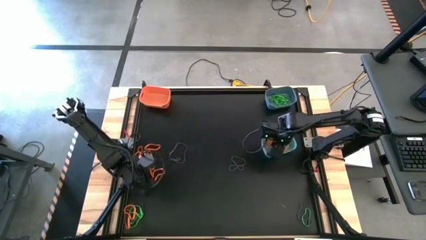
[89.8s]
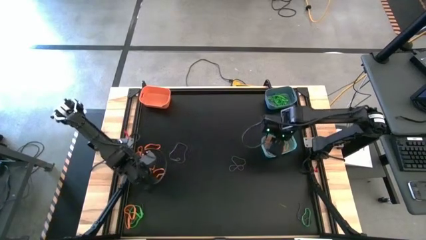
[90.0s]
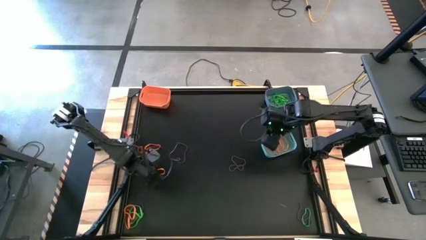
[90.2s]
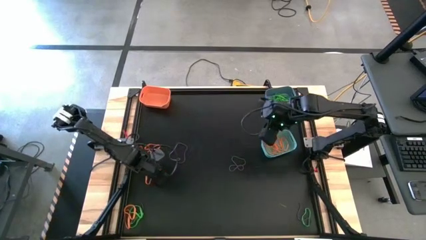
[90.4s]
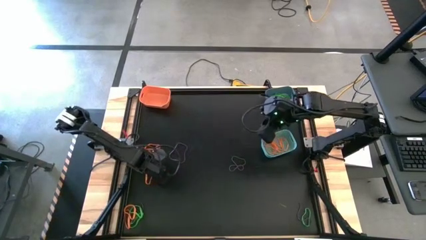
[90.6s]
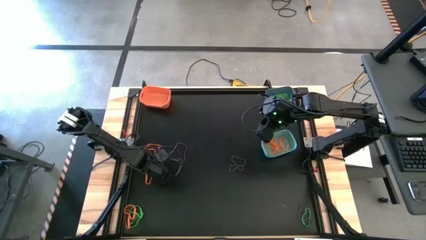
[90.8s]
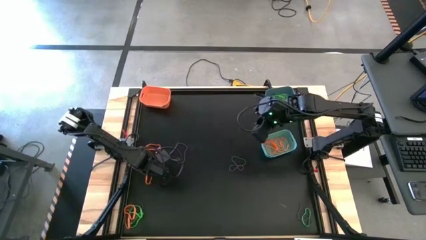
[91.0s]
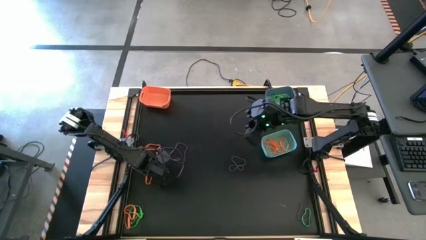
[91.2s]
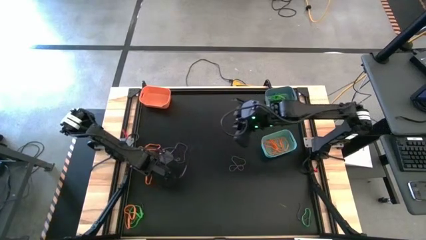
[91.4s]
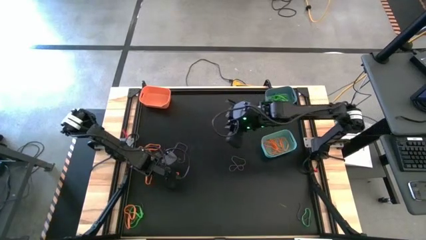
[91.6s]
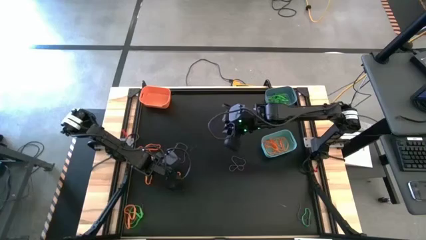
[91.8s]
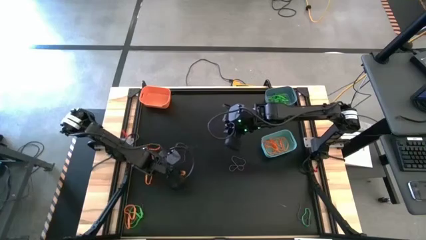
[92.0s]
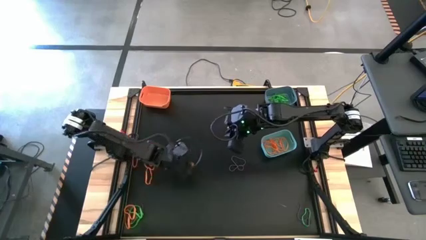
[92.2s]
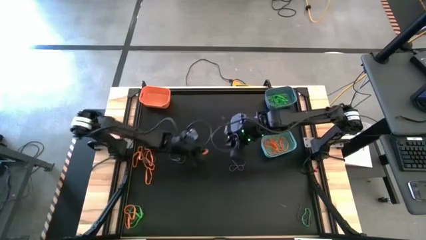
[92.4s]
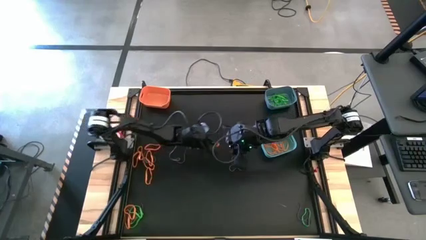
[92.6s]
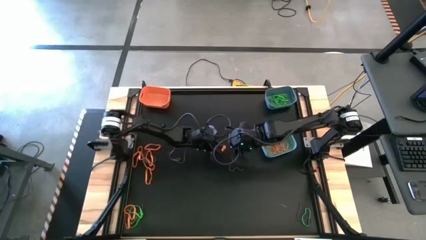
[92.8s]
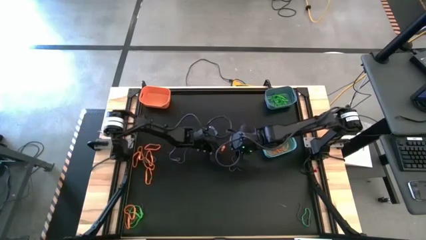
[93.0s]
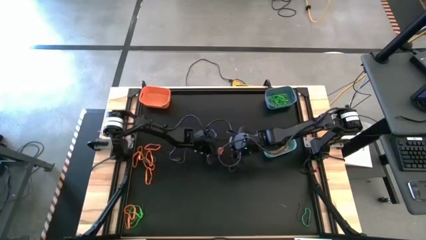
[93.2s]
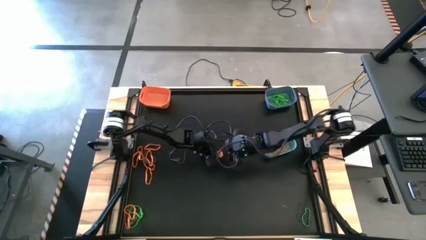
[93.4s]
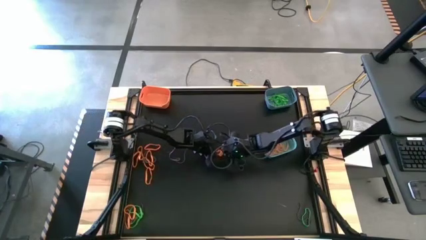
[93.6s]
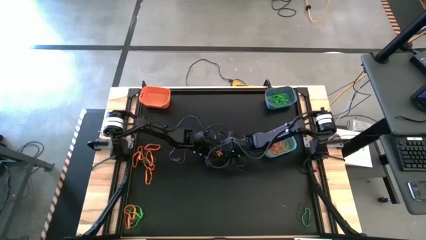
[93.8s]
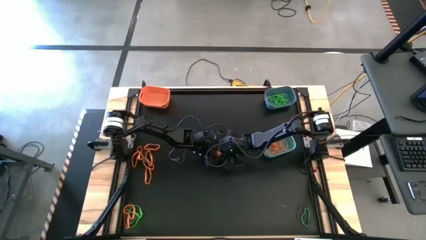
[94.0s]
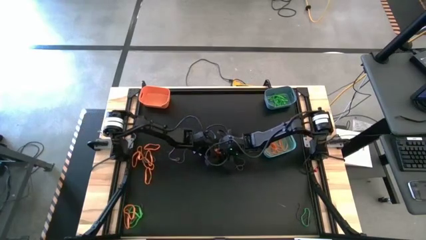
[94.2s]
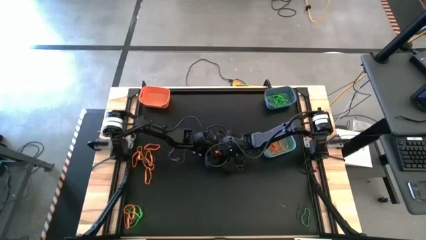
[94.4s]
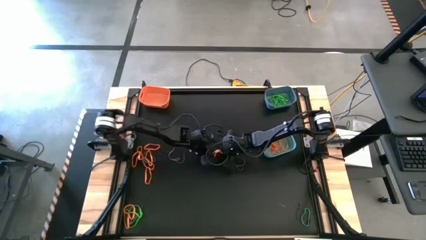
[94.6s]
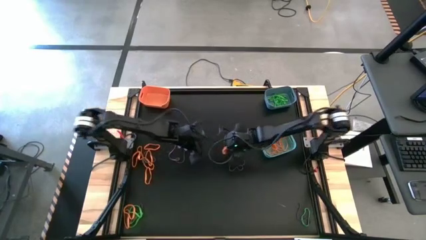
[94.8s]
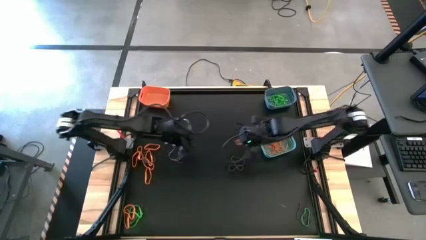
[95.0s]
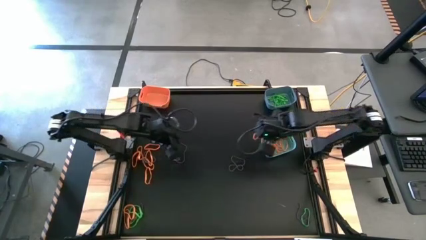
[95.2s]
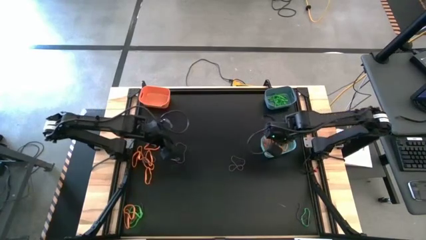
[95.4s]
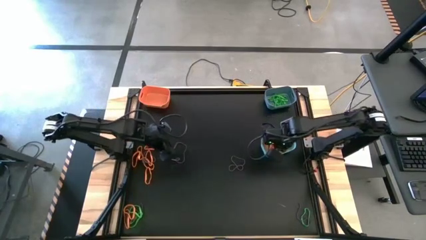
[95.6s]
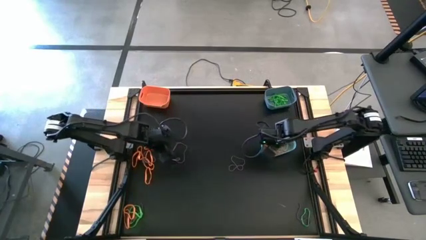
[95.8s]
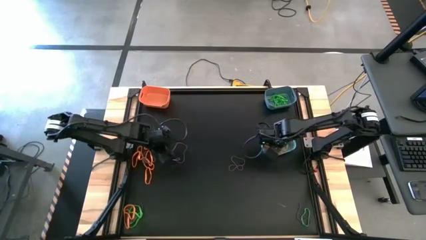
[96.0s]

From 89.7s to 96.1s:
Task: Sort rubber bands into baskets
Put the orange rubber band into the green bin

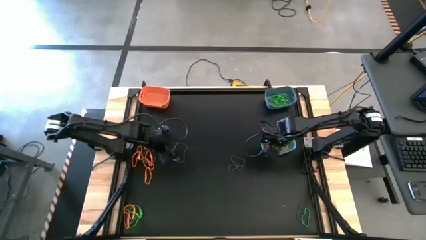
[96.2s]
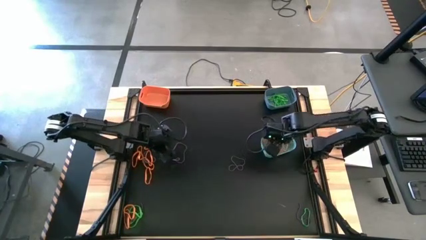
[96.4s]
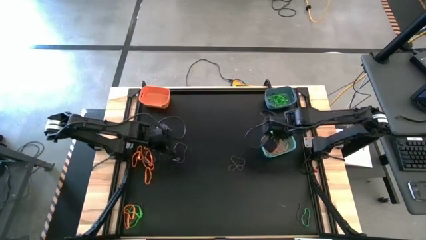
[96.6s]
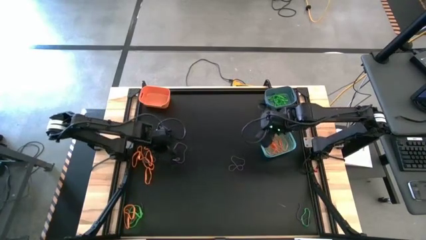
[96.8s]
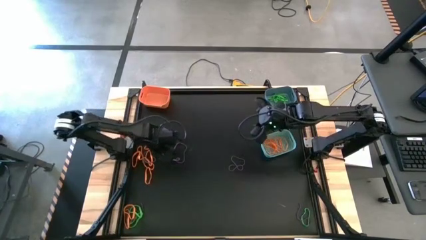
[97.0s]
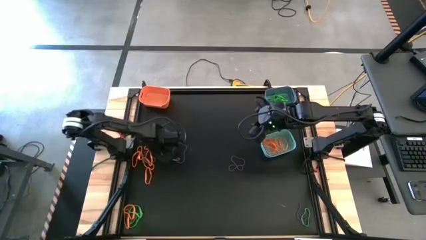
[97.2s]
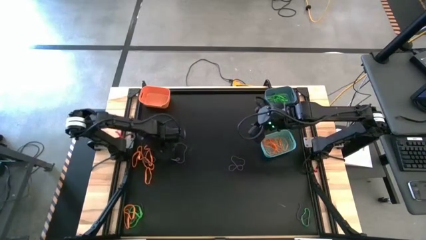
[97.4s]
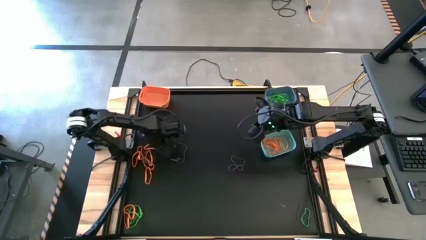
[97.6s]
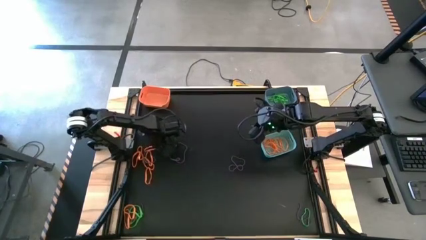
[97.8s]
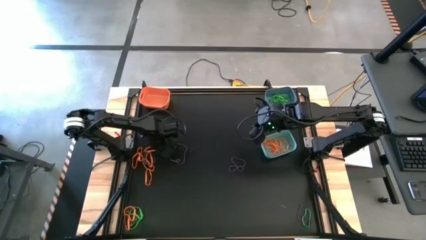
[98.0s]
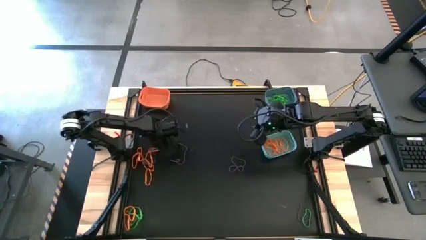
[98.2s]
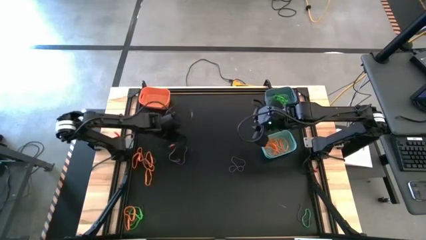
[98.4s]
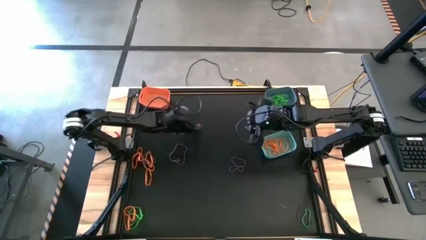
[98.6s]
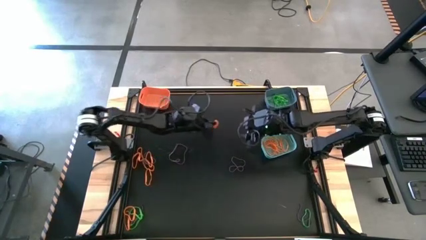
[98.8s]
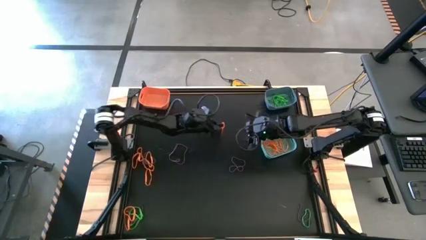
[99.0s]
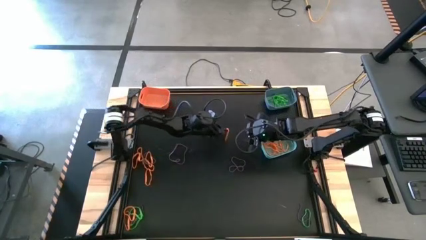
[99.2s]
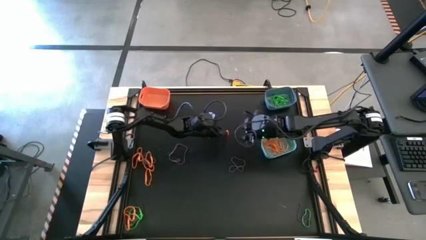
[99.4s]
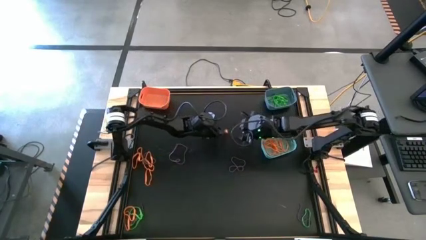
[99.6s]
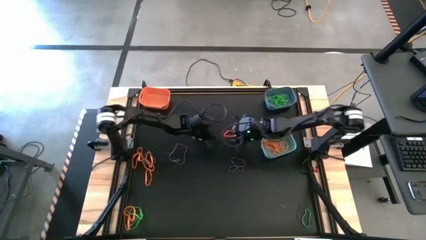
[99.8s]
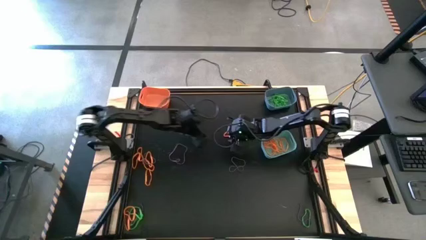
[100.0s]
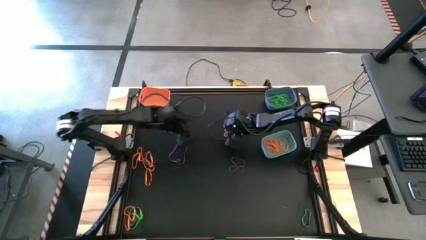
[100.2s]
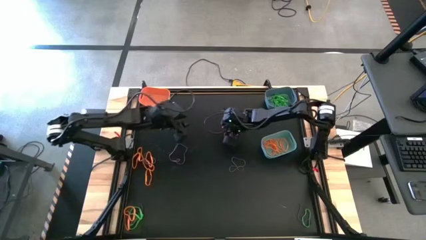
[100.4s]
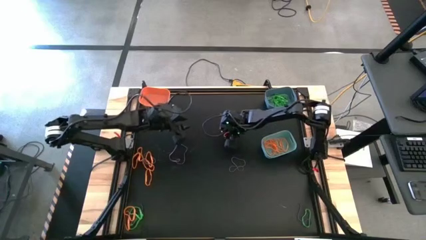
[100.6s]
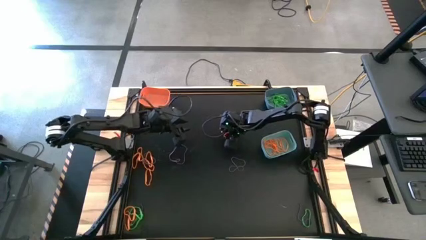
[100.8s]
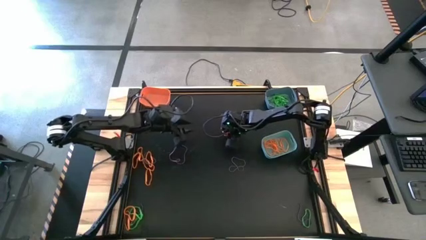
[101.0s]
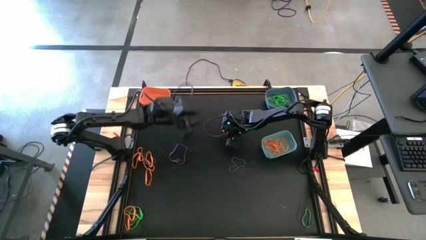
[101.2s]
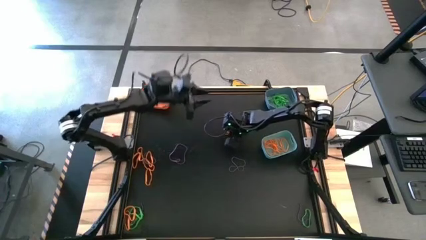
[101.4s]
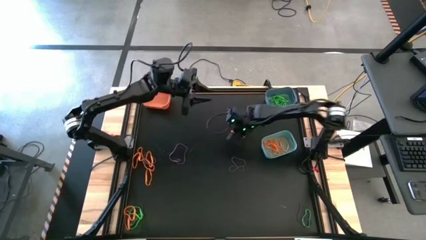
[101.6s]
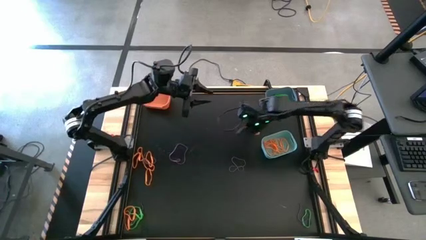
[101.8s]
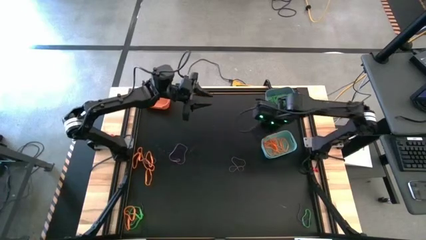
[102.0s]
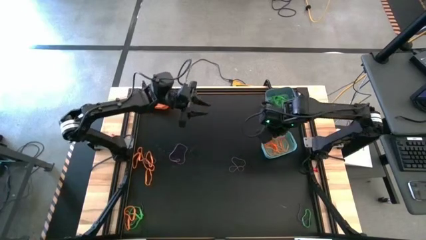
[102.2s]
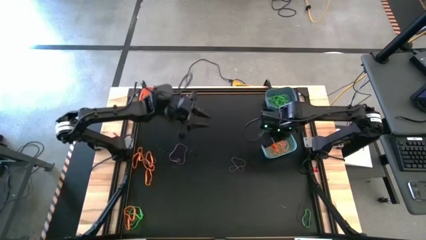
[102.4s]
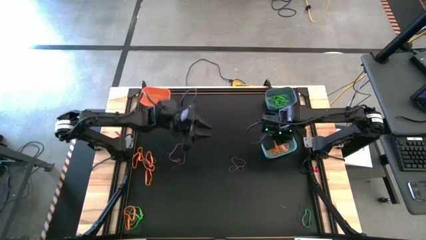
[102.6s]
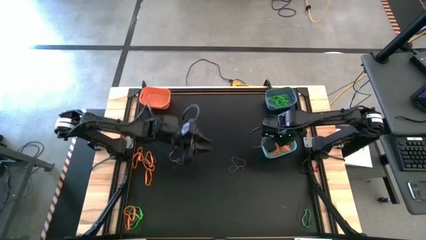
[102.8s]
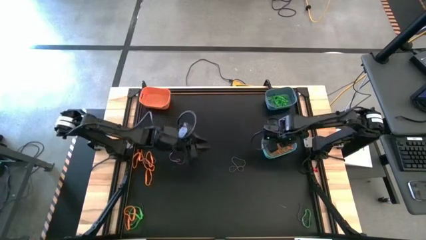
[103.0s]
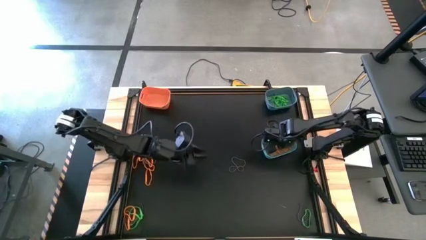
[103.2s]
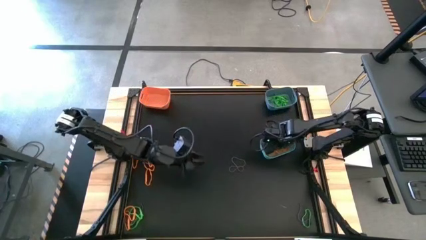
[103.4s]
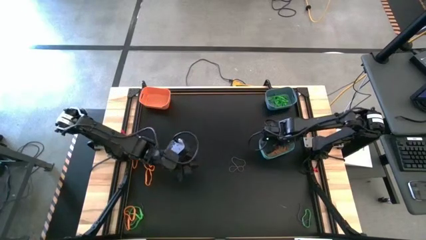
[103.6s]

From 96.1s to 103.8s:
Put the orange rubber band into the green bin

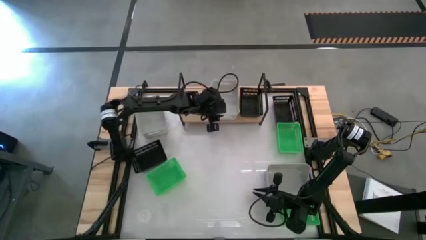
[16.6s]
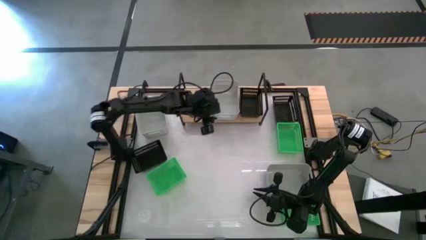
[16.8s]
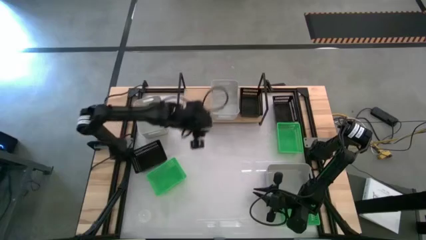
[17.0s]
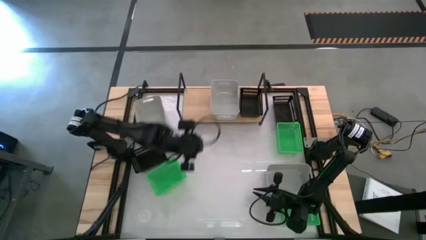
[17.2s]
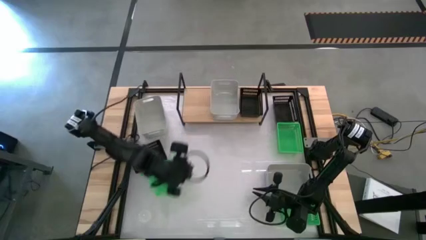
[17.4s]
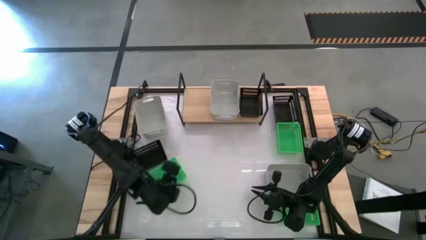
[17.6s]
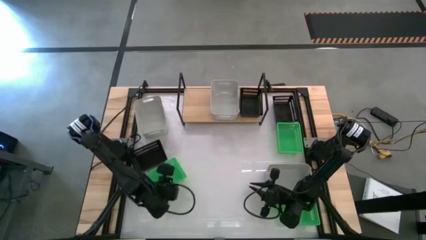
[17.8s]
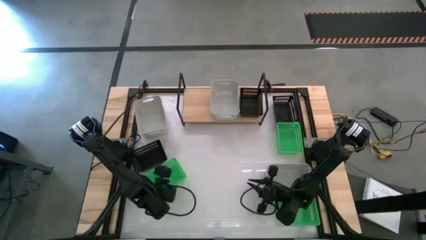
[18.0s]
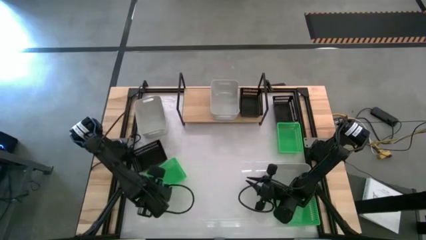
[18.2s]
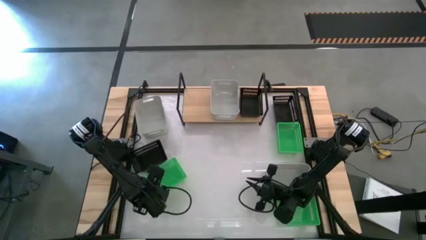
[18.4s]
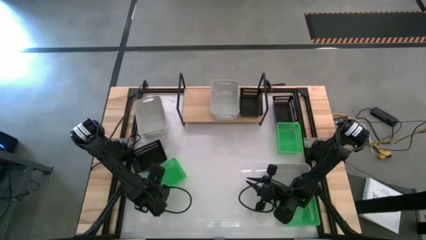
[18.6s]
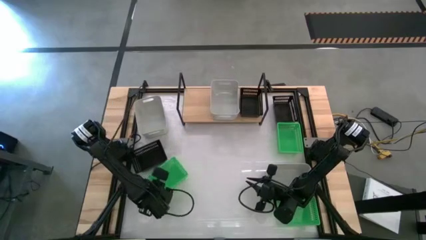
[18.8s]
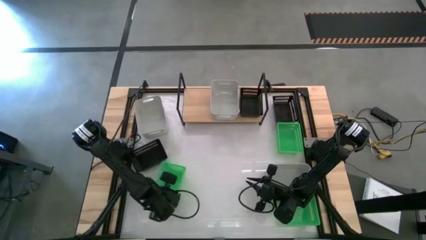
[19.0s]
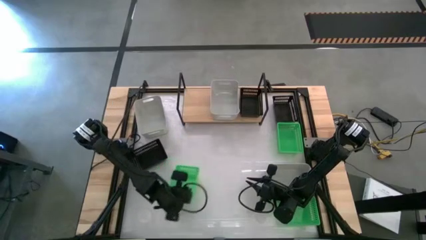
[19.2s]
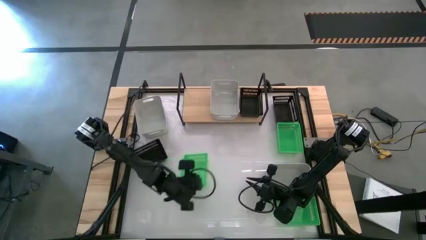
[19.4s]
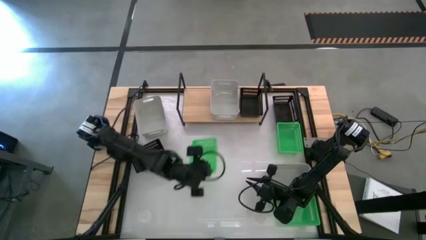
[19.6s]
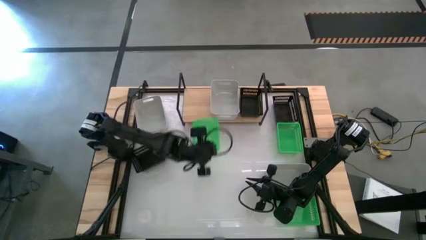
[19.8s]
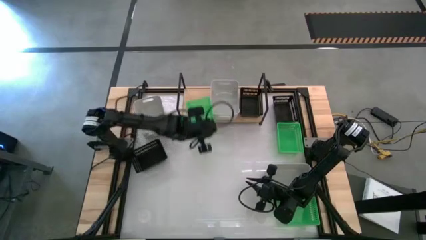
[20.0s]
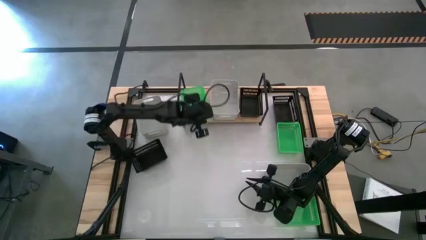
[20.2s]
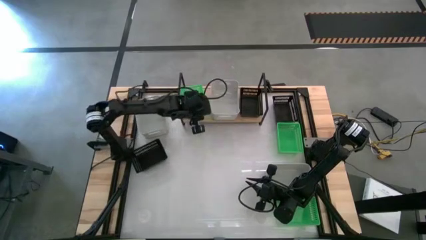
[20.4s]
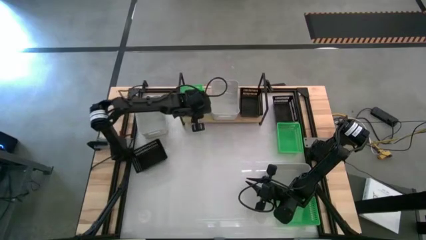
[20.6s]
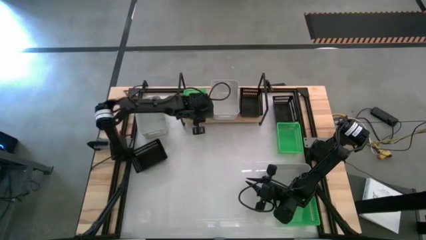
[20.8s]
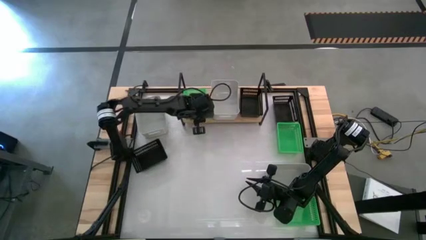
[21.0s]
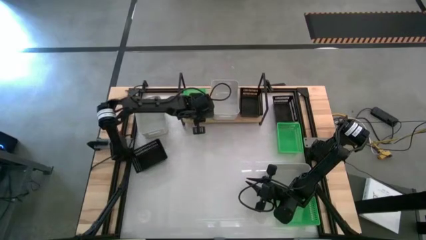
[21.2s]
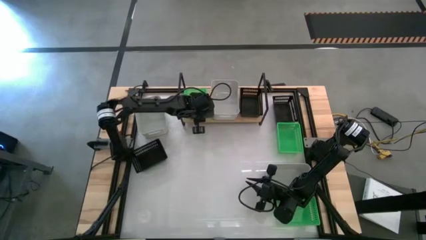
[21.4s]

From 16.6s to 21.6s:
Task: Stack baskets on shelf by color
Put the middle green bin on the shelf
